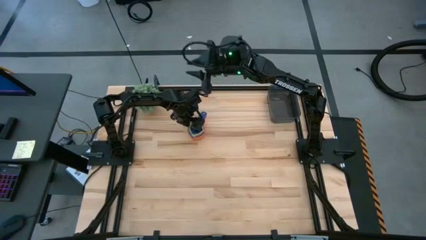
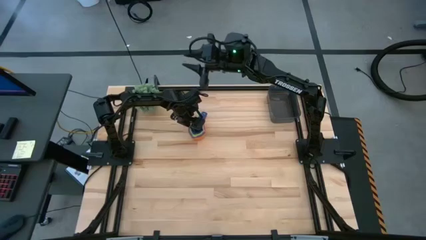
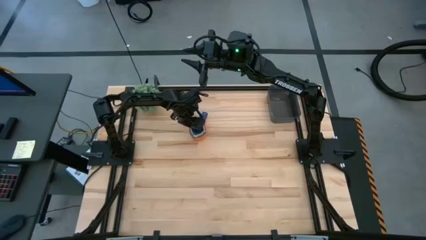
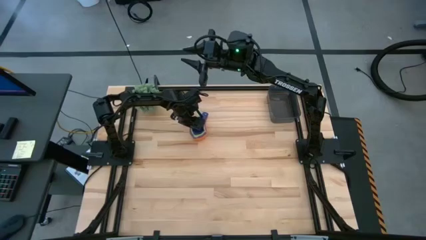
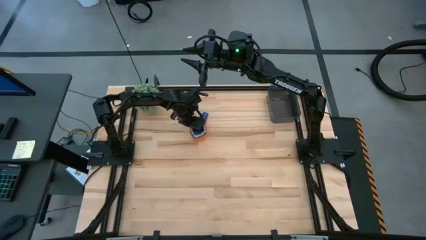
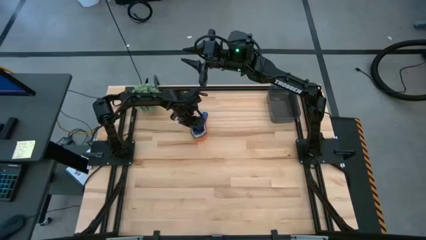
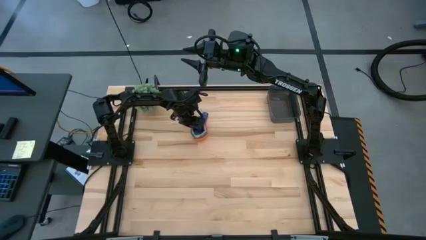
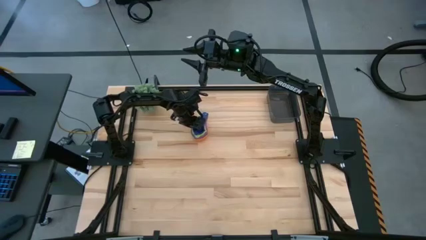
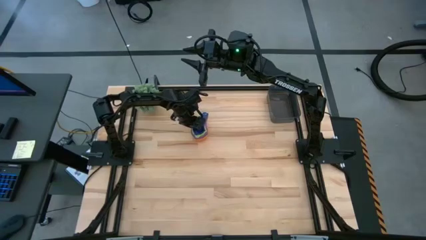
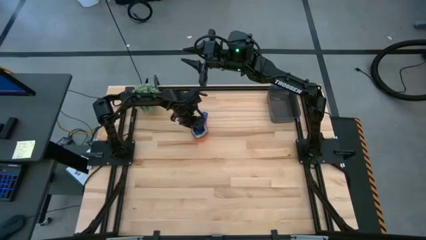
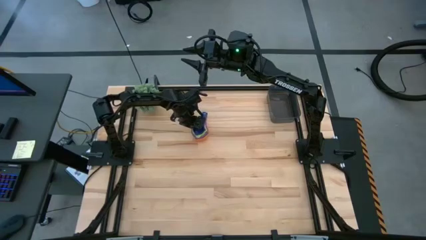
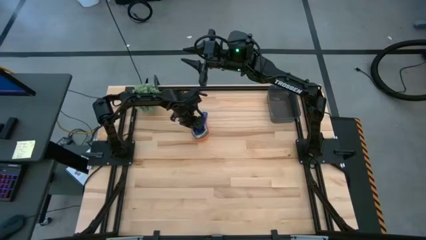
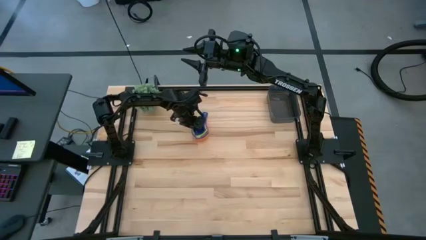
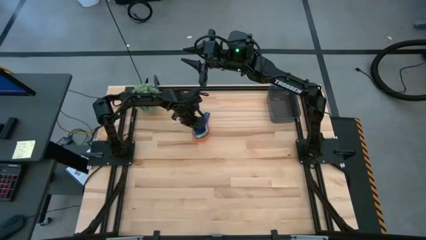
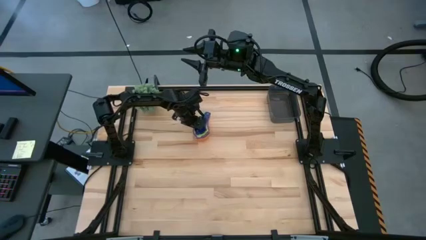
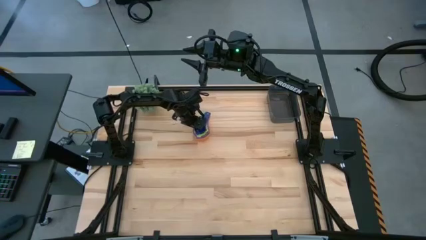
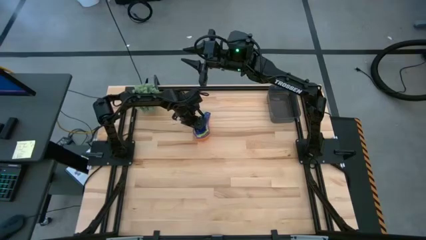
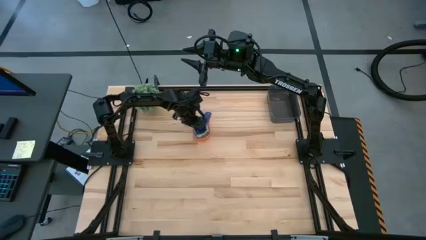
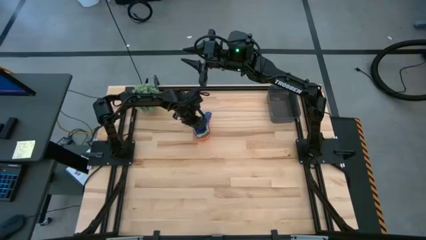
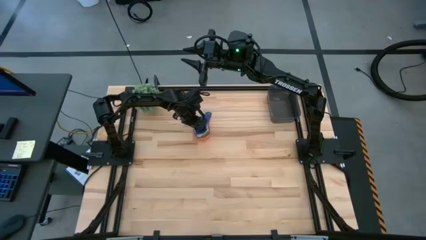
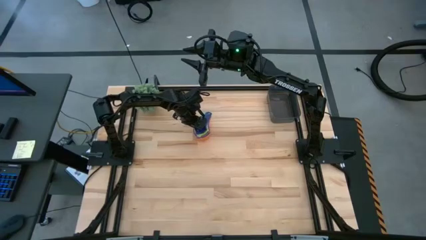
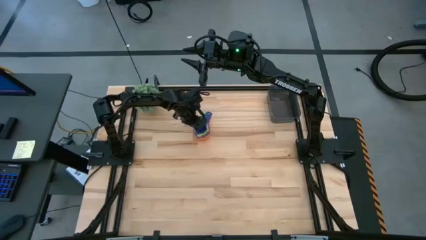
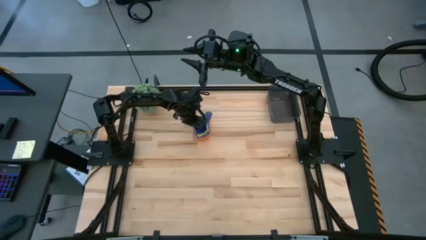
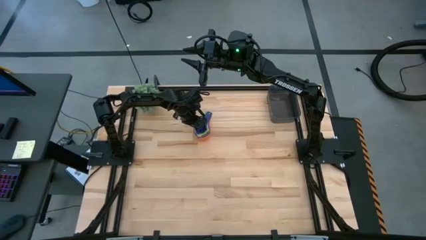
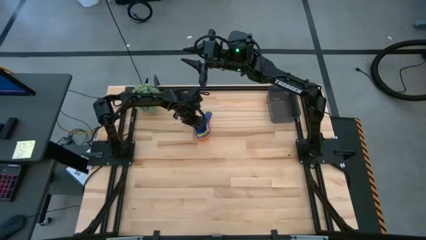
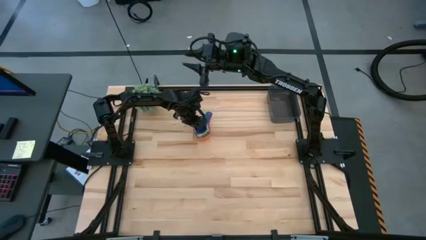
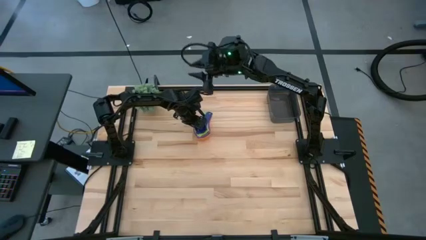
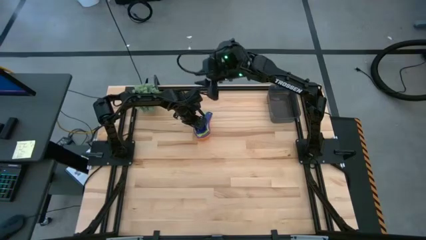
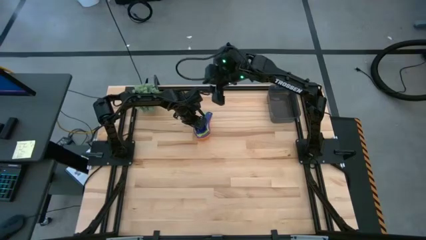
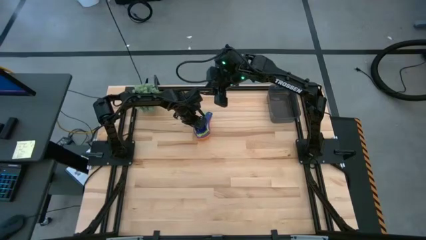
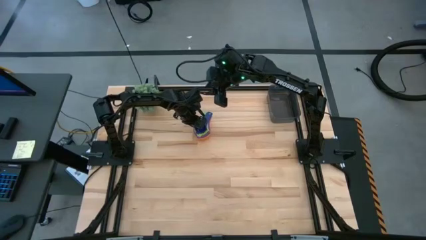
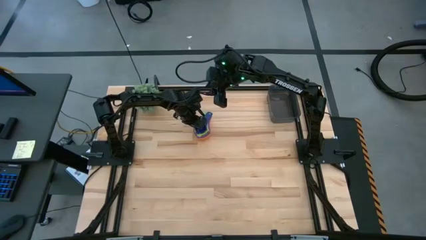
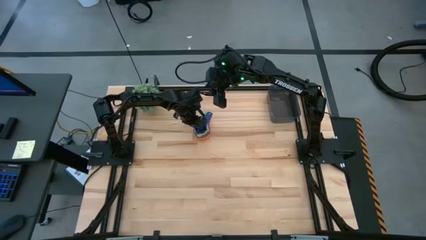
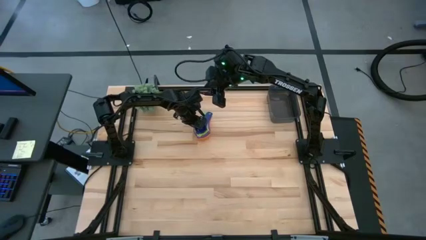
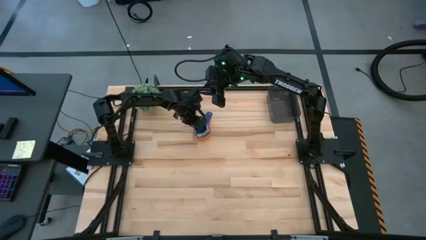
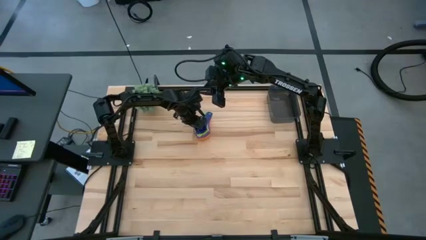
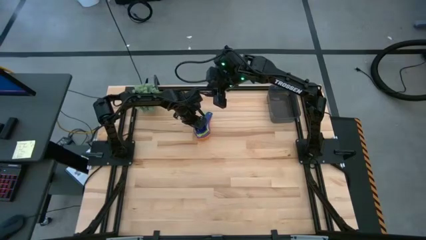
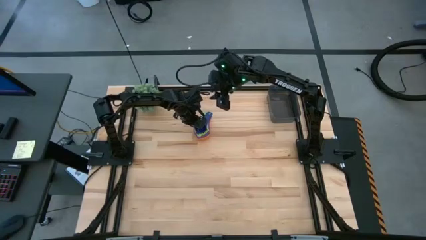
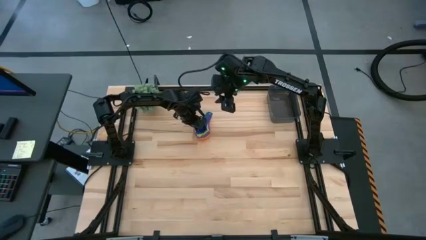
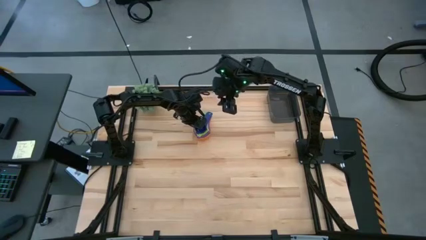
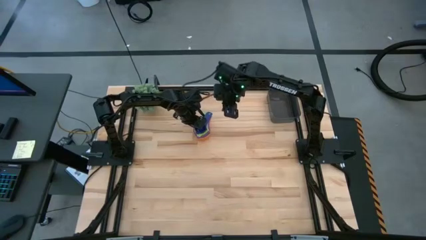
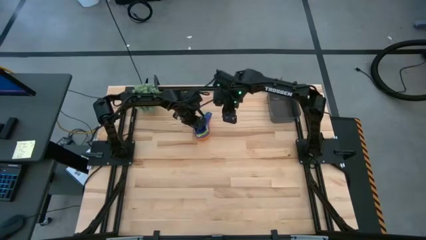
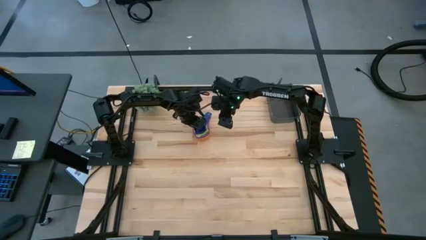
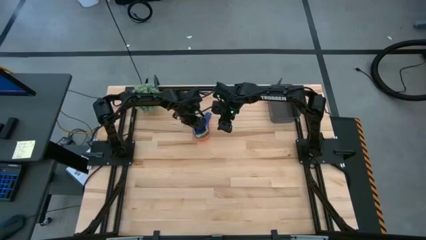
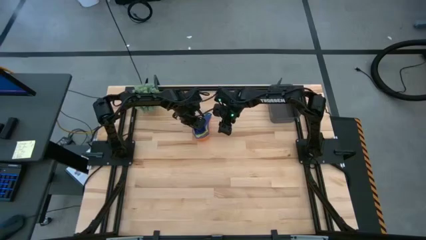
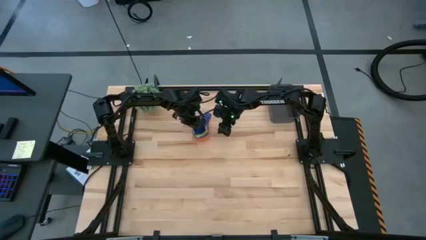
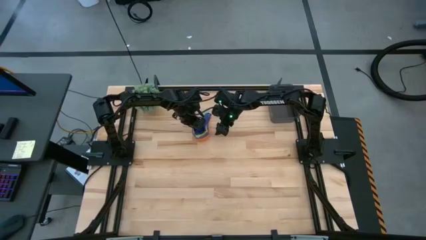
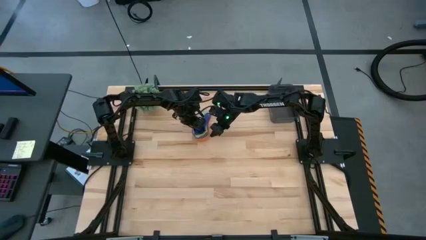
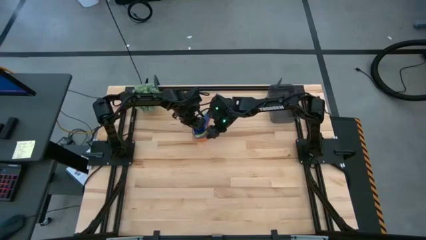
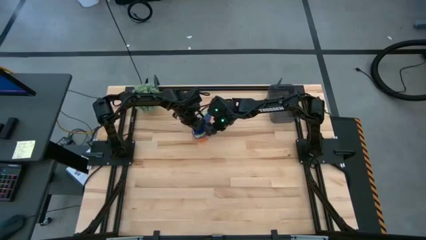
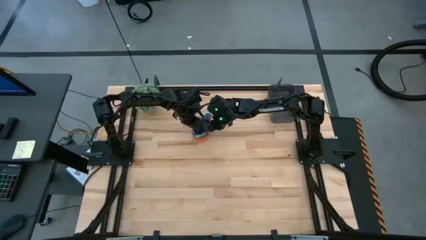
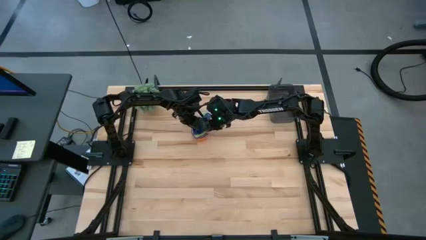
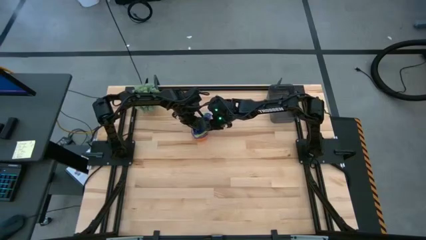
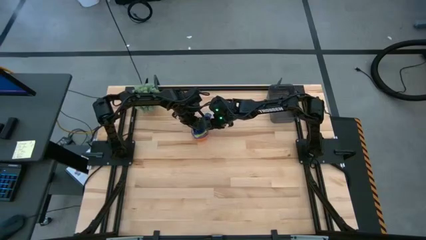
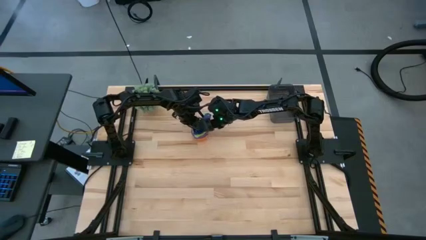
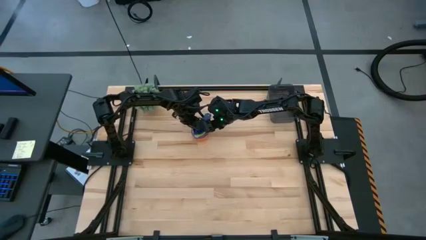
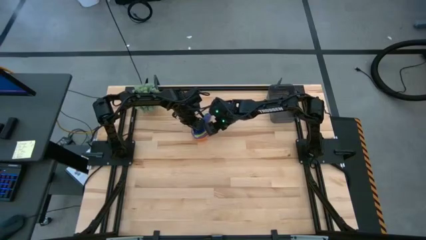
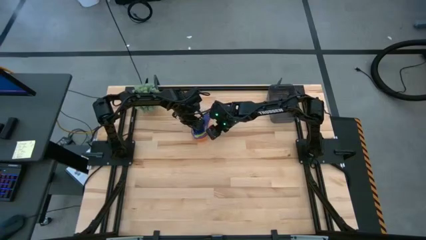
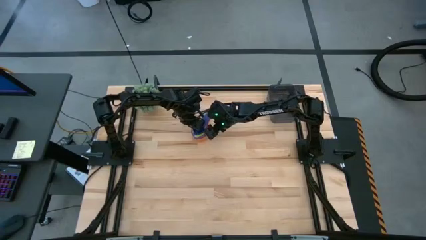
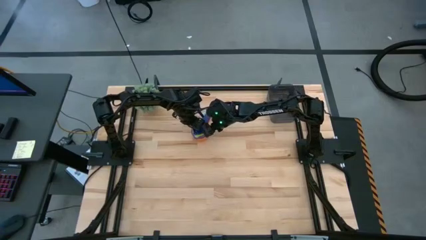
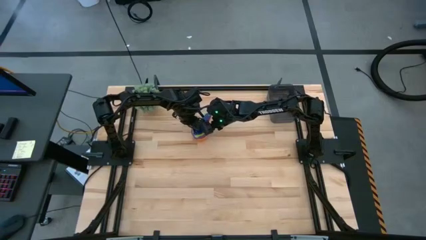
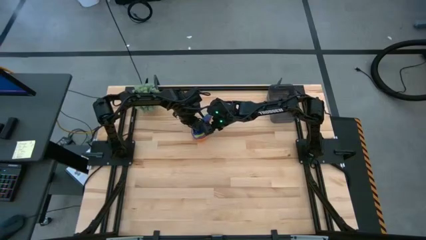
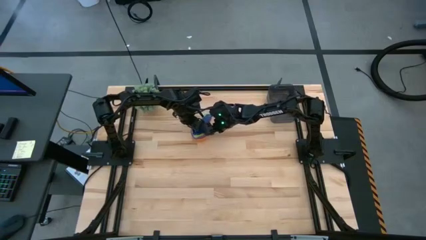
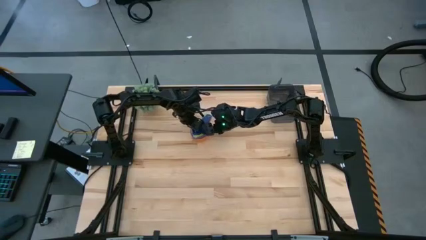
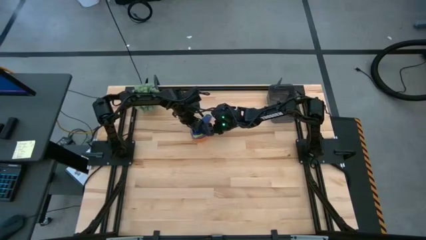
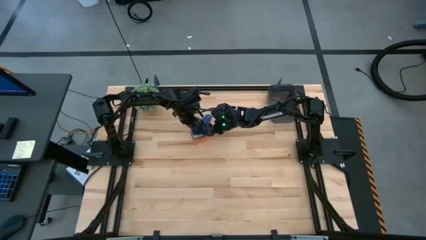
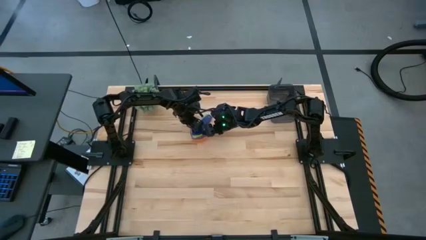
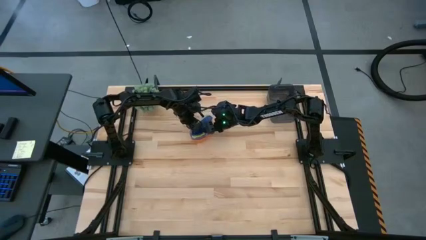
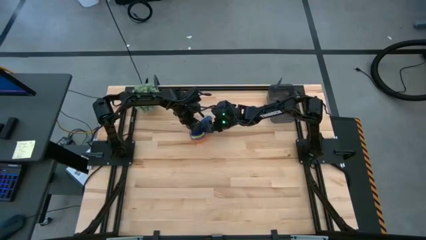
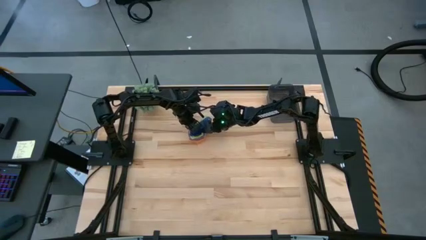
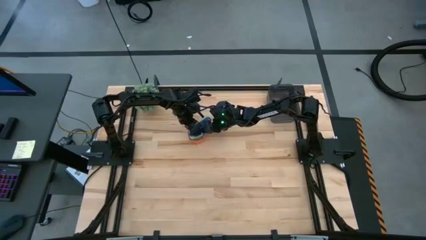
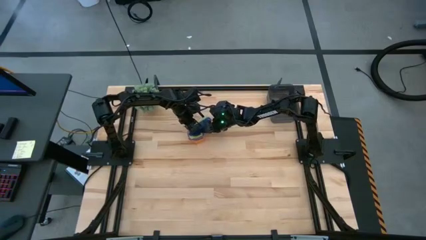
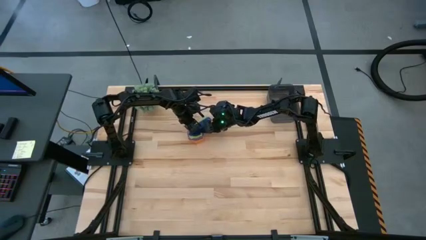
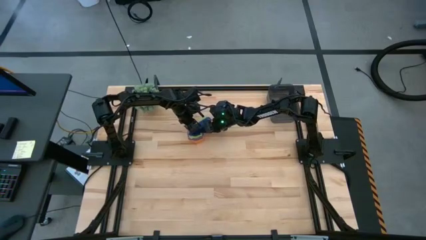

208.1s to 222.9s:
Task: Nest measuring cups in basket
Put the nested measuring cups into the black bin

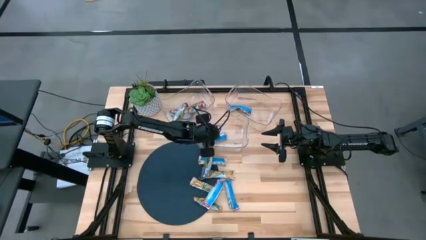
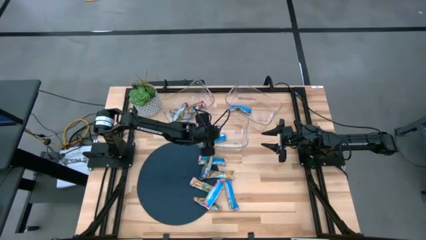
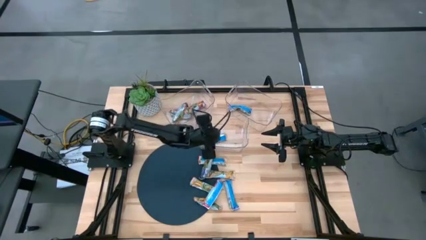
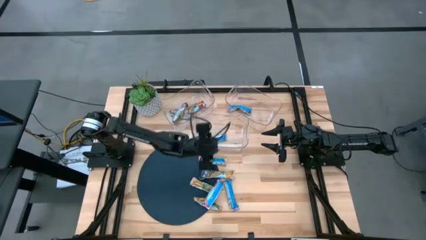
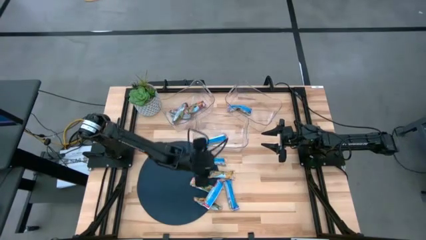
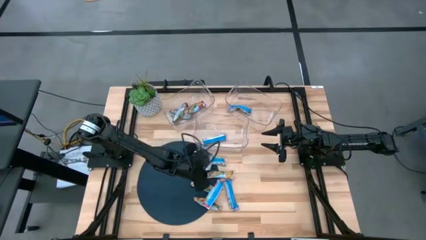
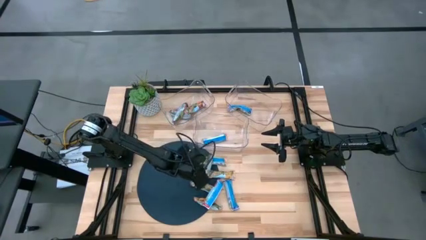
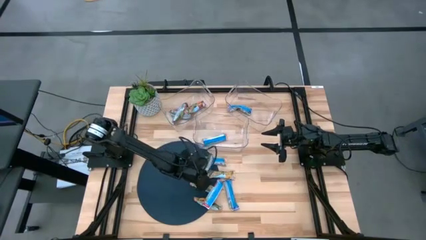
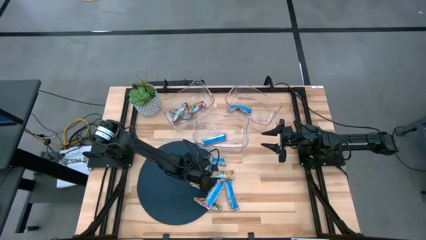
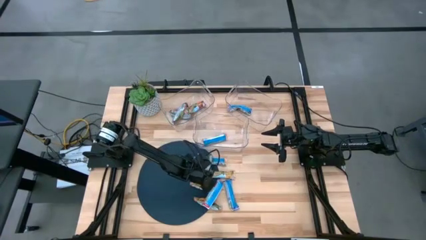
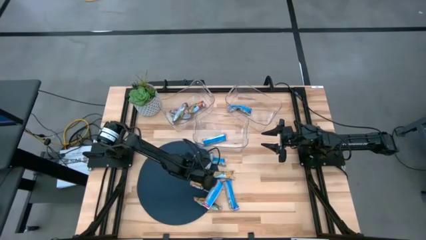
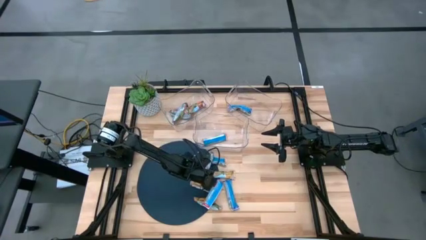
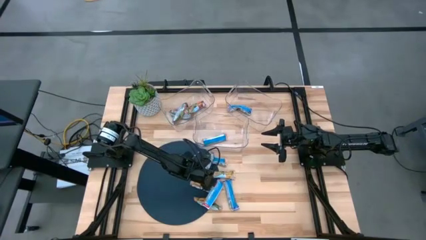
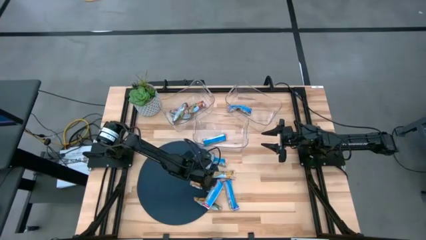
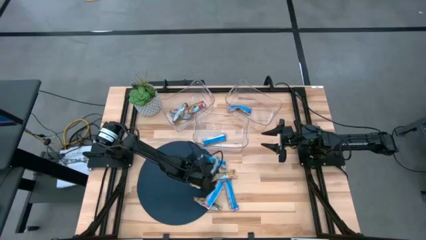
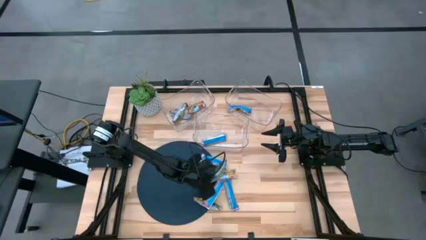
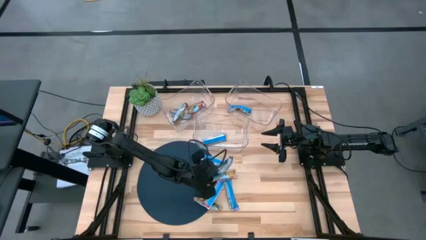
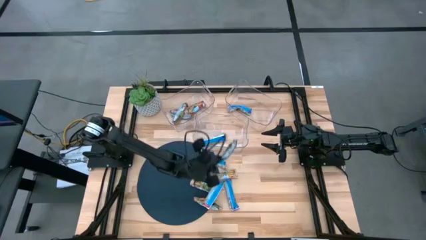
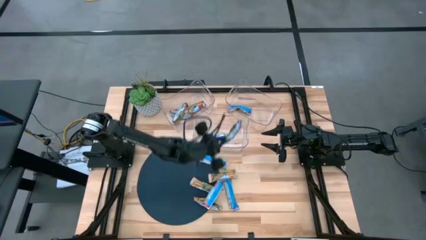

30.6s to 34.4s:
Task: Pick and place Granola Bars by type
Put the blue granola bar into the right transparent bin
